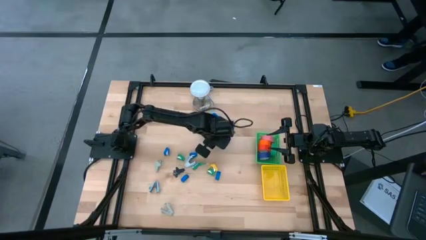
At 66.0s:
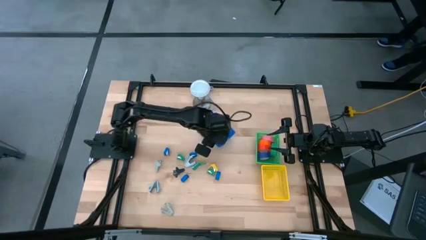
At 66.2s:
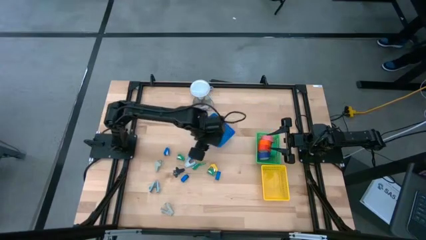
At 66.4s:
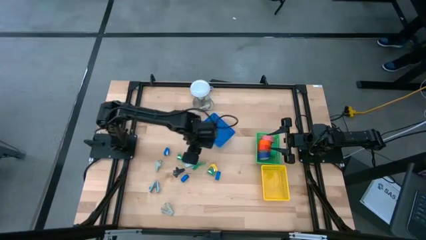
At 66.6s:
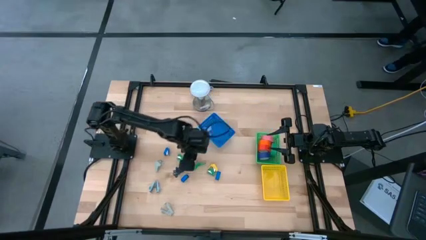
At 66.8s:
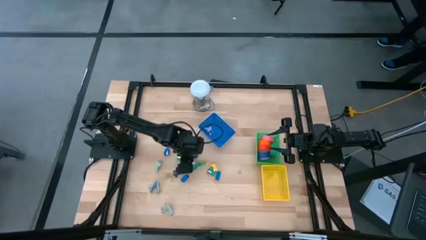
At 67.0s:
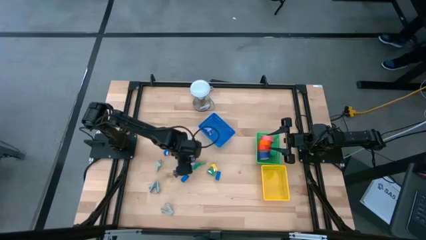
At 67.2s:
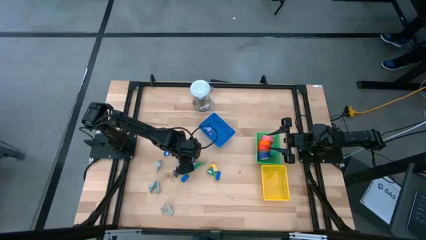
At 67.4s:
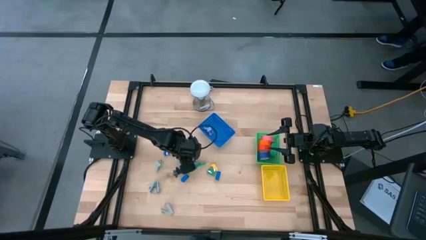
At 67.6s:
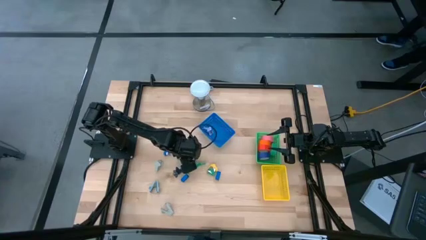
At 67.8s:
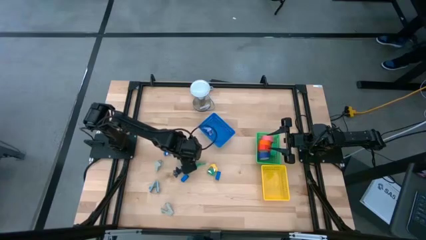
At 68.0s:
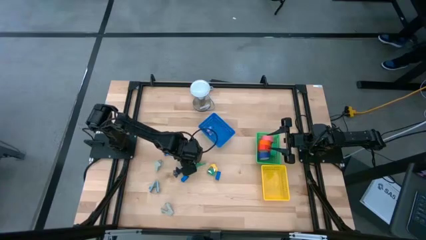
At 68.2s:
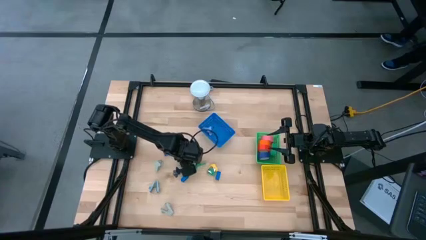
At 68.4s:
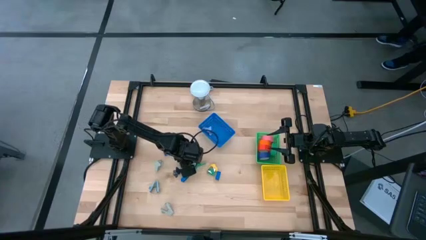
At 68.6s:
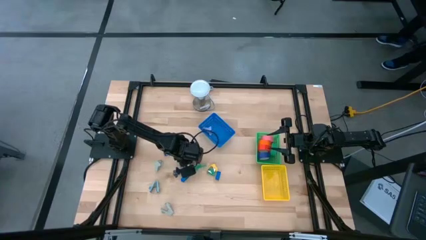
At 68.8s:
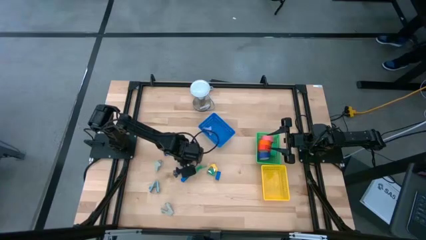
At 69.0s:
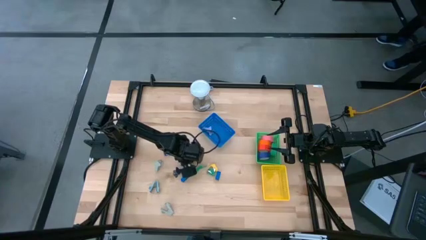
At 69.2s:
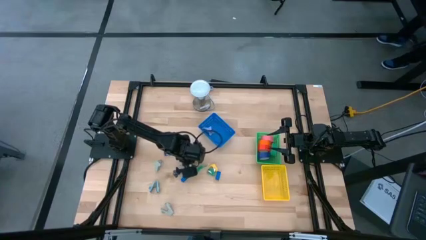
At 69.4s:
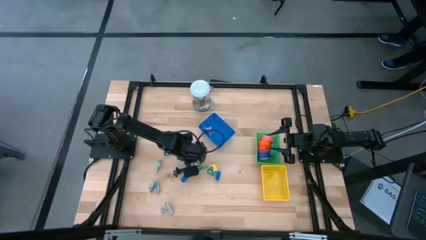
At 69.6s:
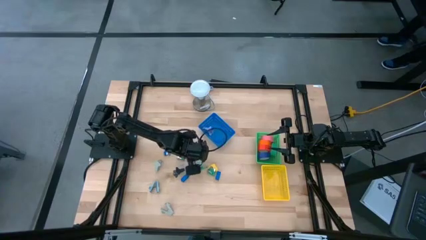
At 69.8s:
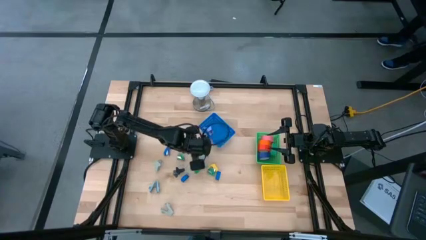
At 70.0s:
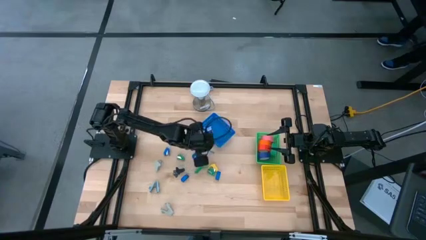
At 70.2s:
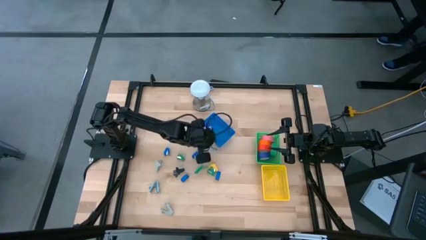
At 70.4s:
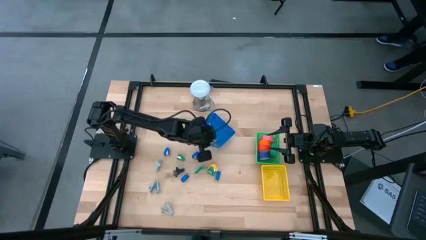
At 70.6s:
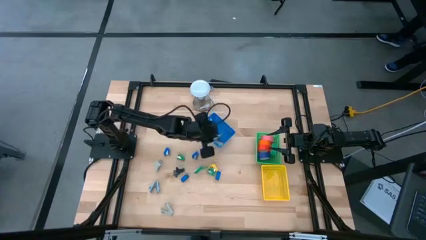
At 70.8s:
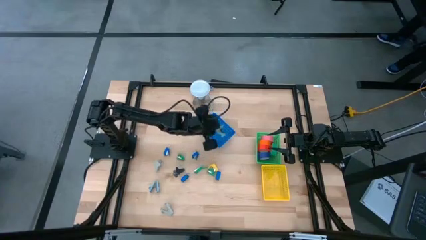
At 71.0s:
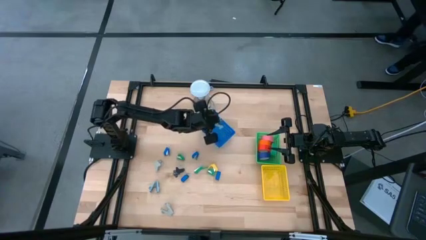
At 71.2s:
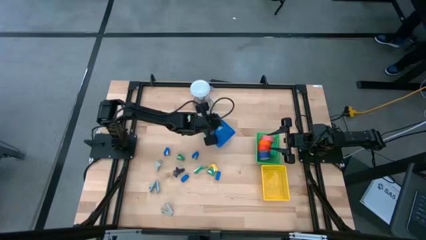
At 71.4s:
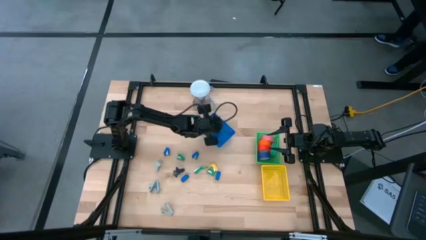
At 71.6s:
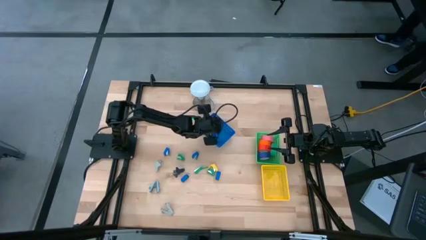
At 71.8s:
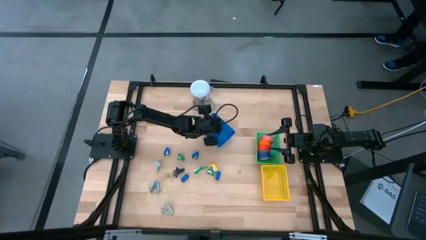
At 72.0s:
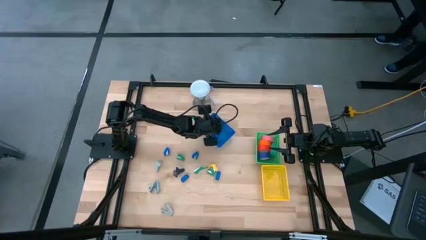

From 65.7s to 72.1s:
Task: Pick and place Stapler, Stapler remover, tape
Put the blue stapler remover into the blue bin

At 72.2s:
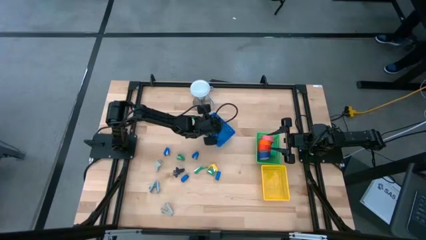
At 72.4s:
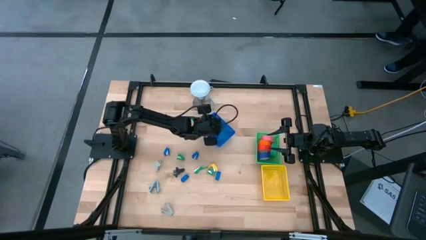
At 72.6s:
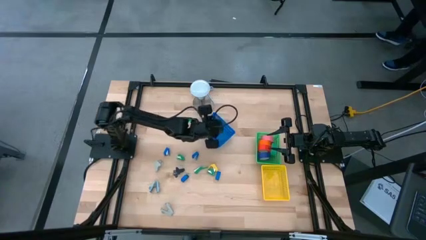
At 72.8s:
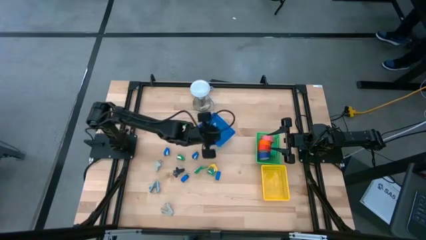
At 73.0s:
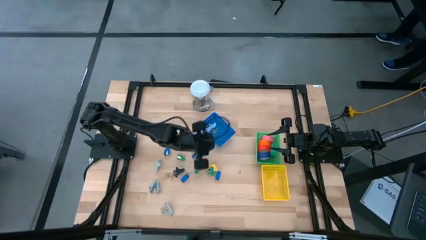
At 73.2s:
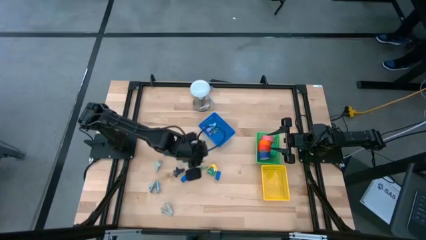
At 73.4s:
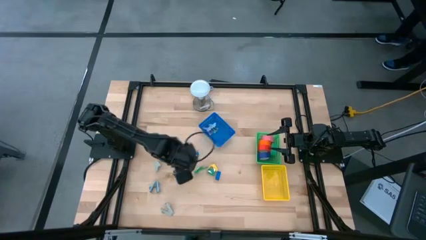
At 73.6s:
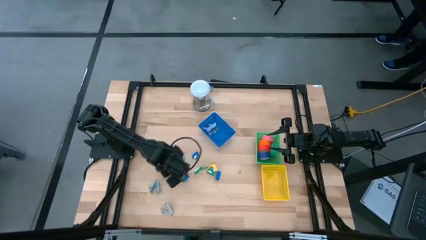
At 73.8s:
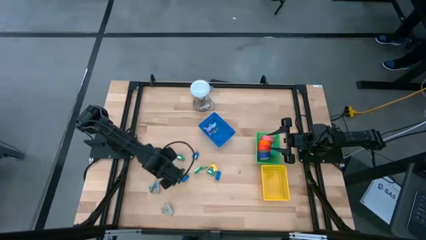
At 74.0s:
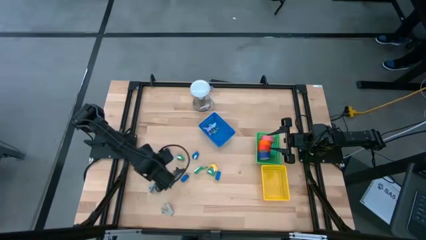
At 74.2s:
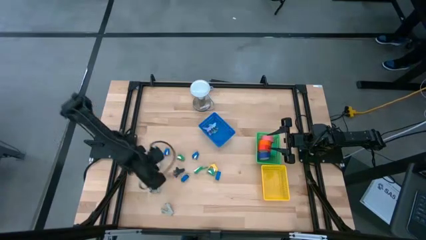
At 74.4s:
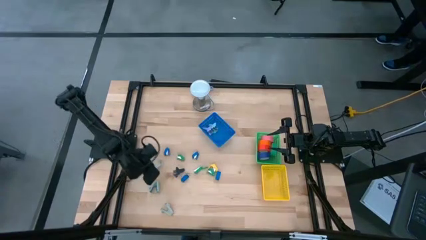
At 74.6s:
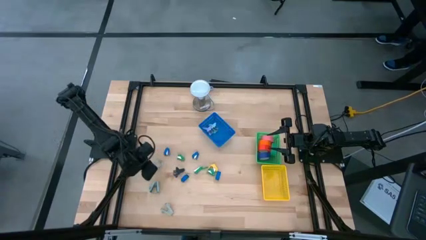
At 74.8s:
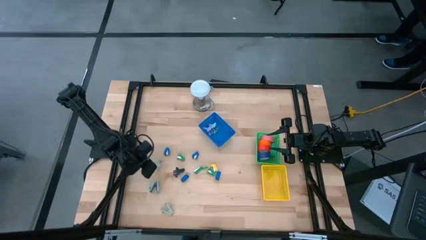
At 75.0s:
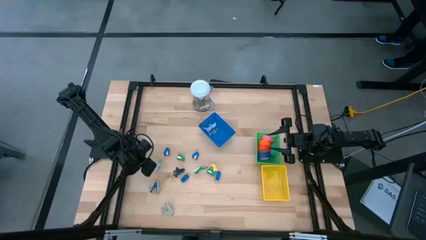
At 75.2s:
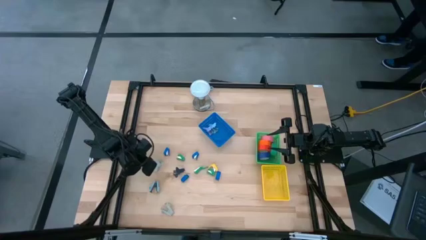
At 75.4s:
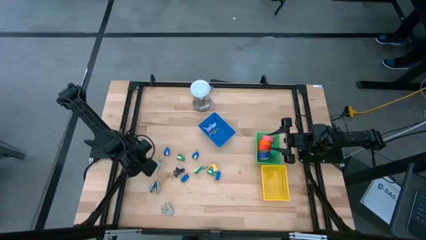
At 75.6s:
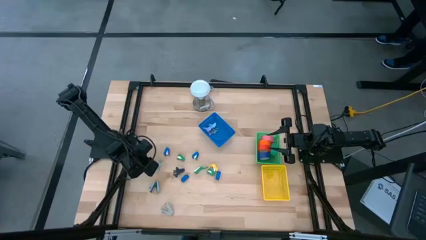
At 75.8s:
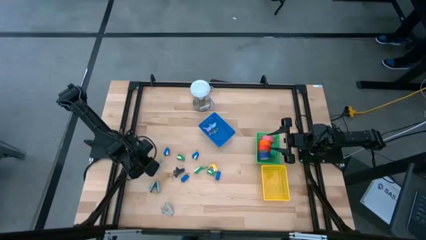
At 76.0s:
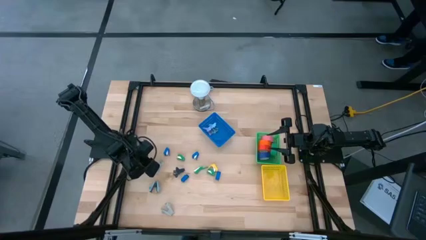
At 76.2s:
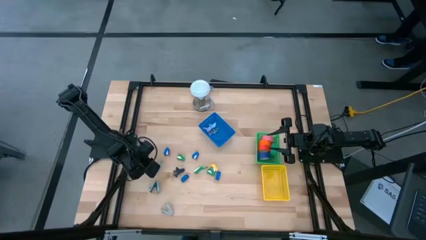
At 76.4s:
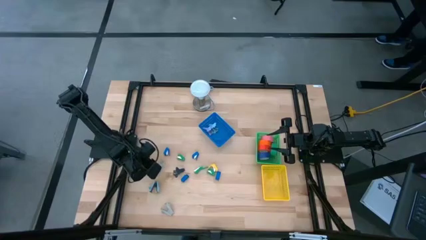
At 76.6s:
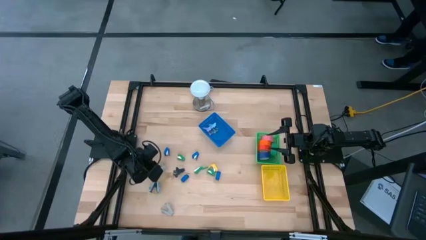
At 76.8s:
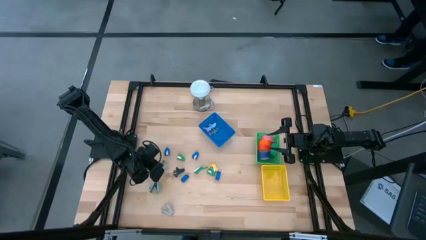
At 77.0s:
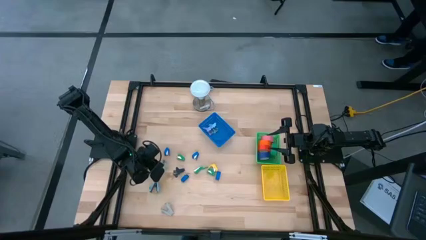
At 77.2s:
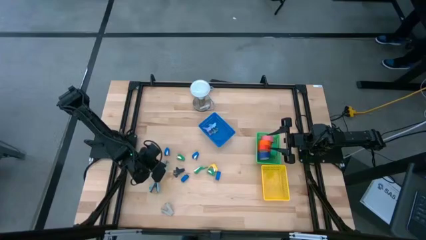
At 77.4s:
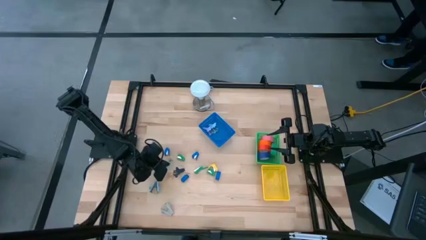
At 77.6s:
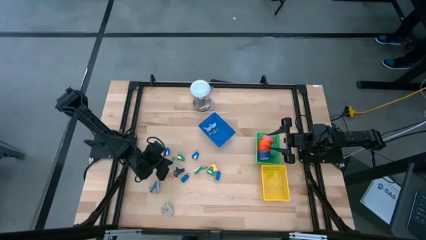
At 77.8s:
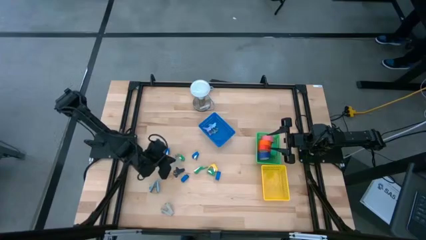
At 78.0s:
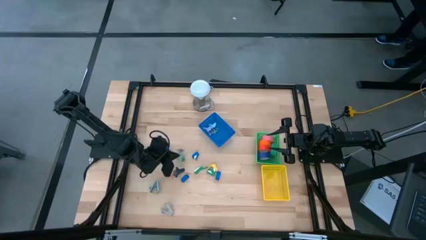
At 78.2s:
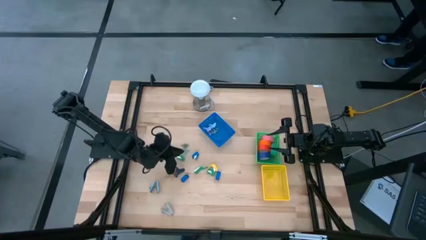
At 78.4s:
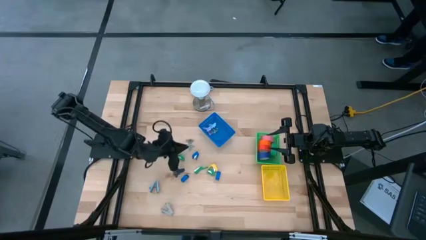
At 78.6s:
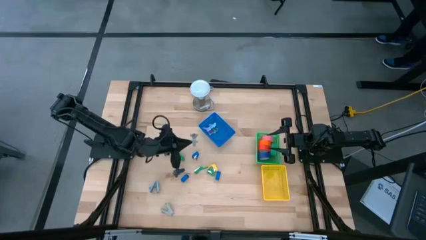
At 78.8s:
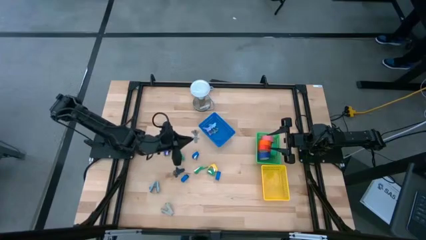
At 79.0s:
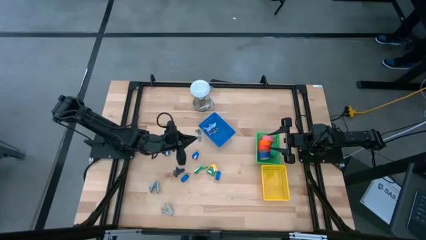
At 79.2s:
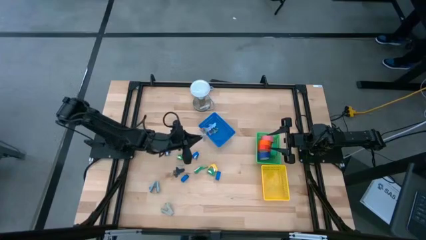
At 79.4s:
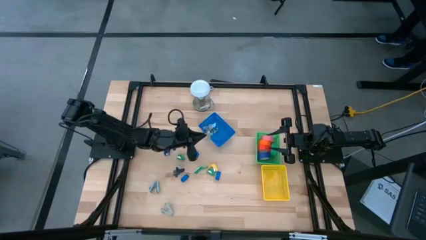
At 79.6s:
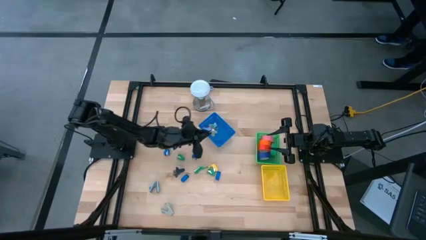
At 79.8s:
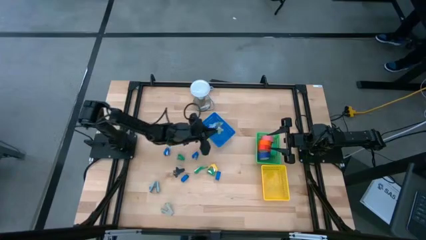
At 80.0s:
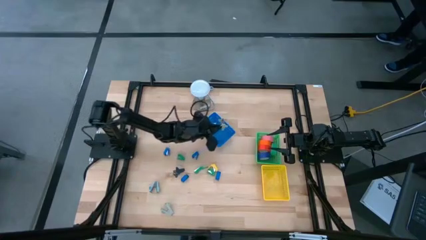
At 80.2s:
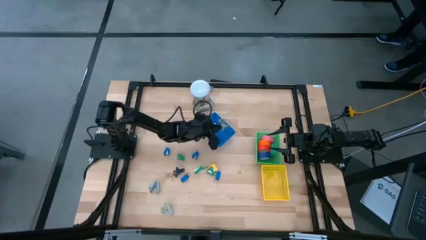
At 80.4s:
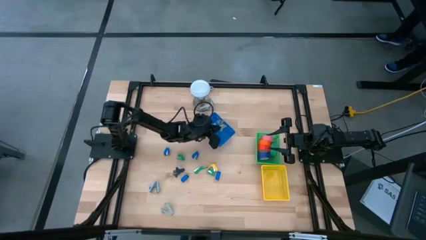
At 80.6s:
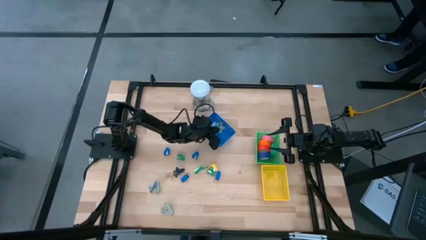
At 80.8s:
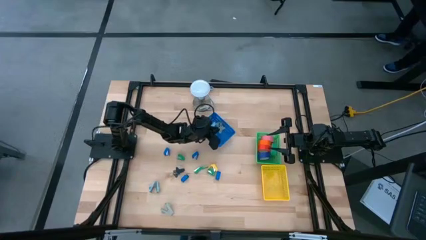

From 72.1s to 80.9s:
Put the light gray stapler remover into the blue bin

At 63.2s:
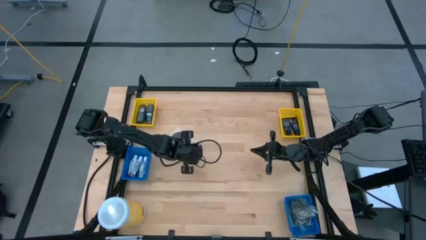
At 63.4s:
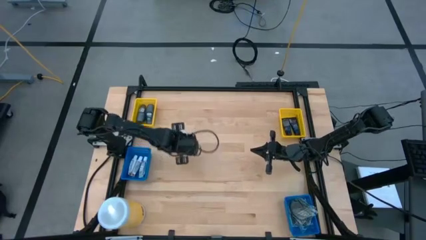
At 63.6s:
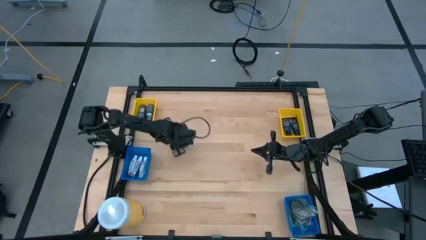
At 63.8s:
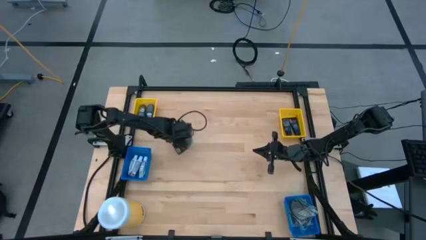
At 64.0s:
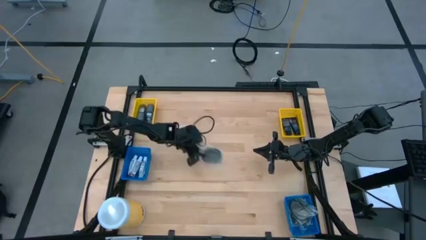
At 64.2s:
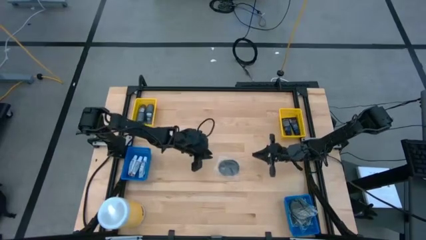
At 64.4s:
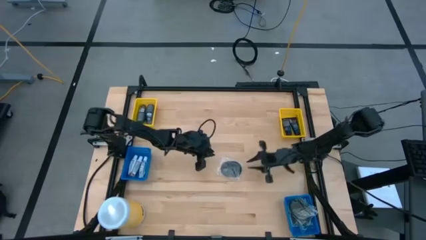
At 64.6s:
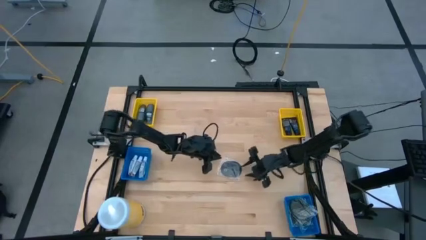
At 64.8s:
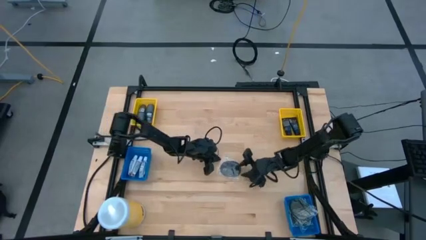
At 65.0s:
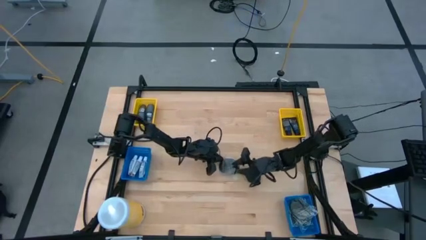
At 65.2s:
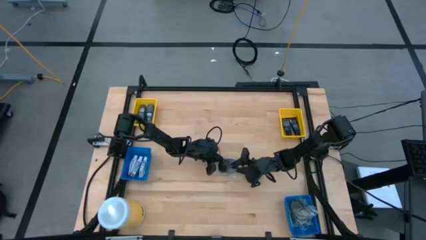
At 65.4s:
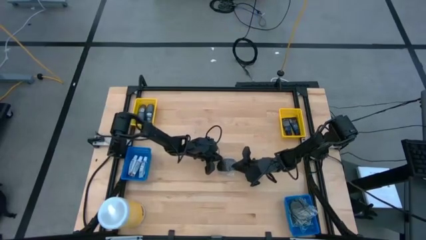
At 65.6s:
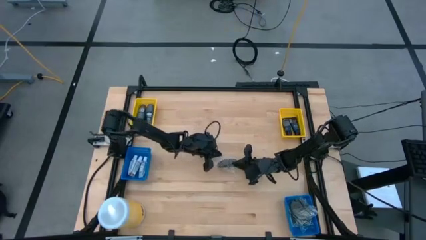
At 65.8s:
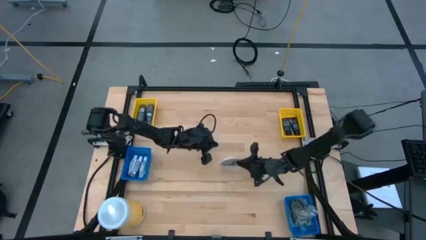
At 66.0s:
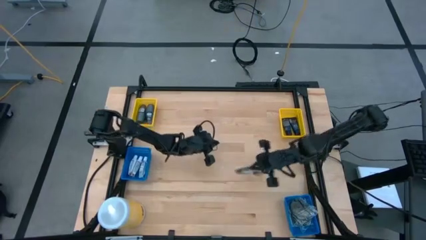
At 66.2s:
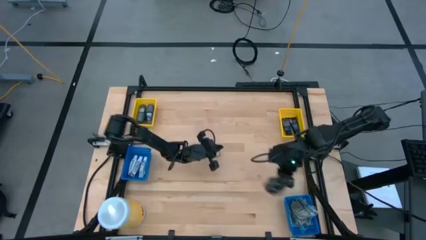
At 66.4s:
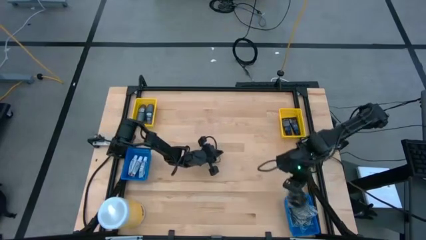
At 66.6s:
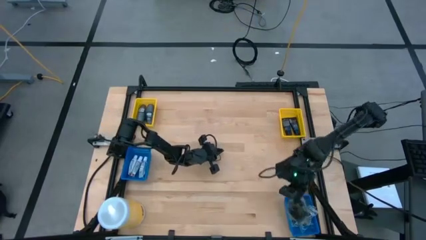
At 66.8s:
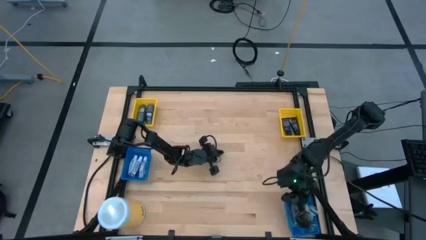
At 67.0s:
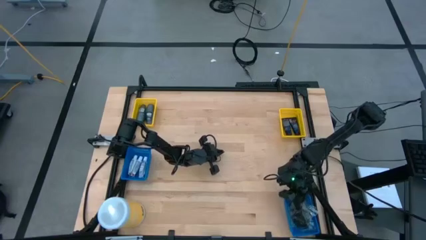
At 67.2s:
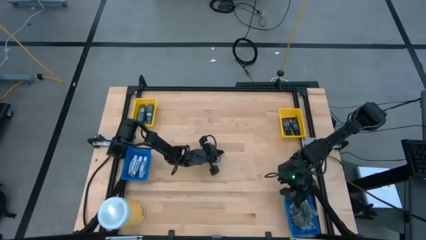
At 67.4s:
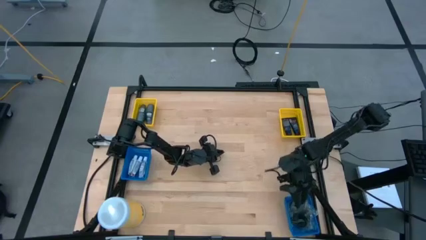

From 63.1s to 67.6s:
Task: Pick & Place Travel size toiletries
Put the black hairbrush into the right blue basket
